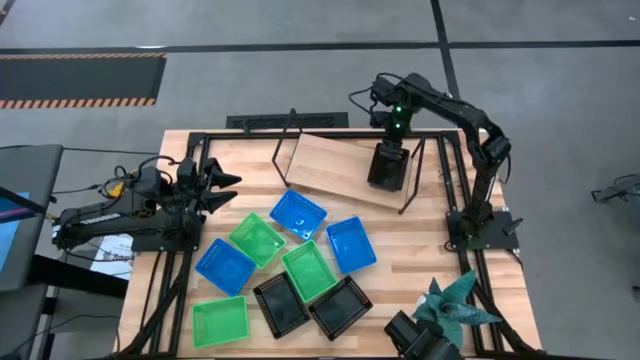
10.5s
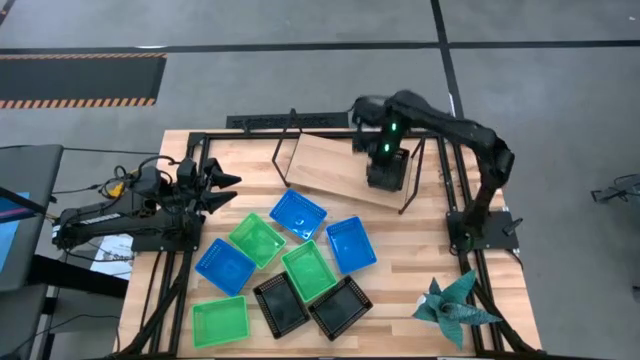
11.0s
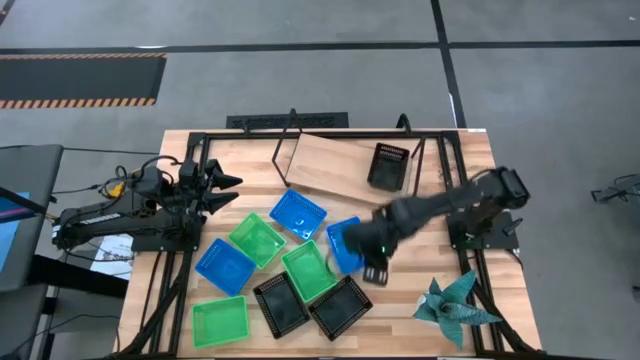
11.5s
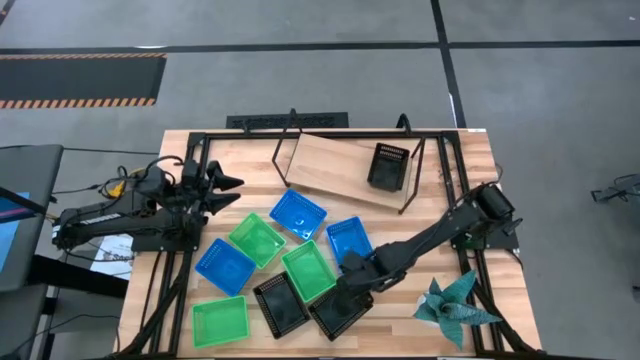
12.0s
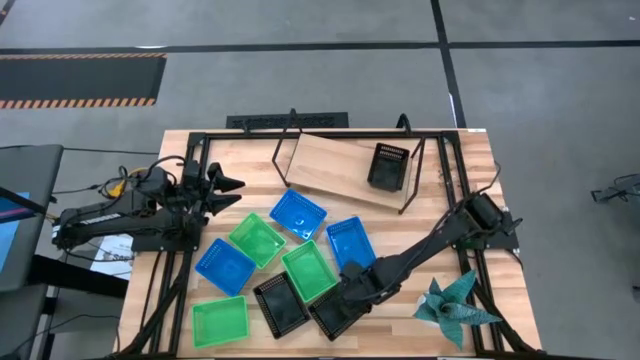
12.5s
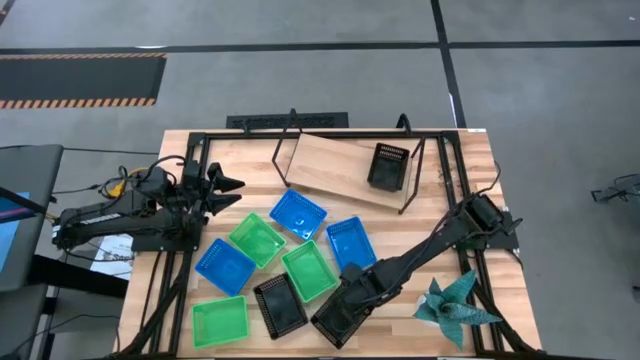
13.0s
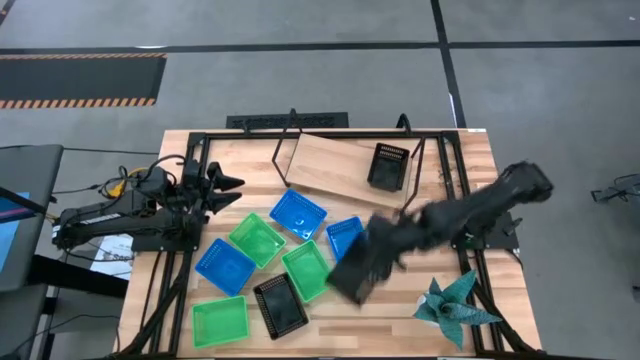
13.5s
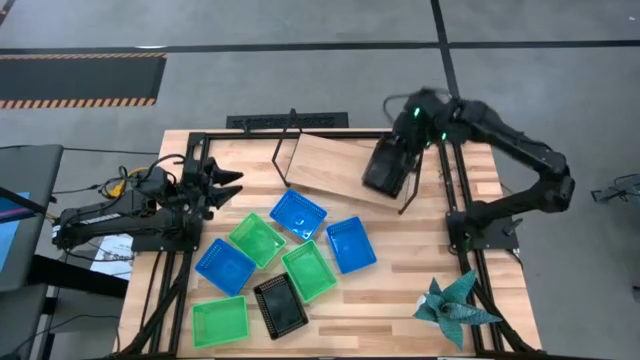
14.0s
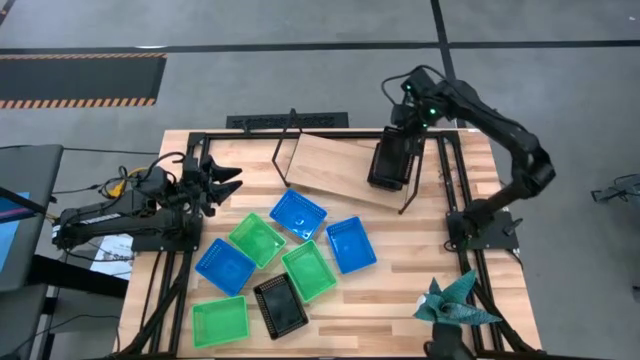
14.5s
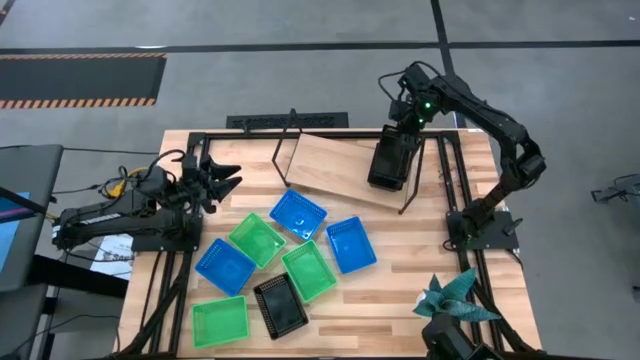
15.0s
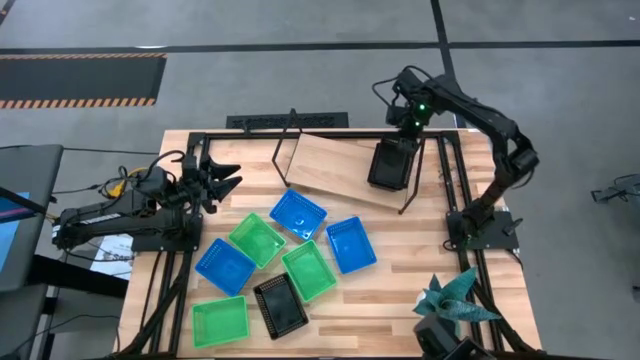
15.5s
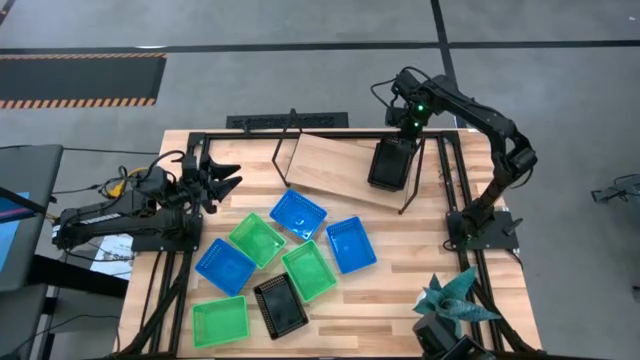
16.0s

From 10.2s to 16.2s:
Task: Stack baskets on shelf by color
Stack the right black bin on top of the black bin on the shelf

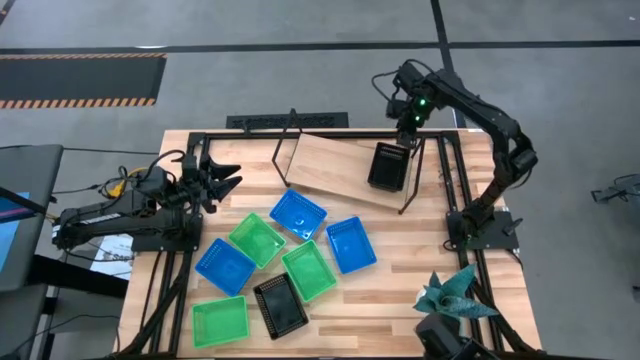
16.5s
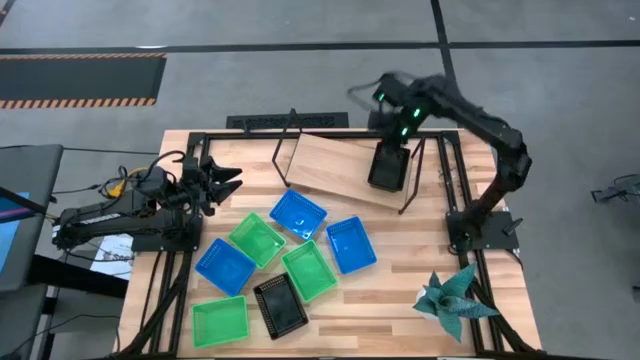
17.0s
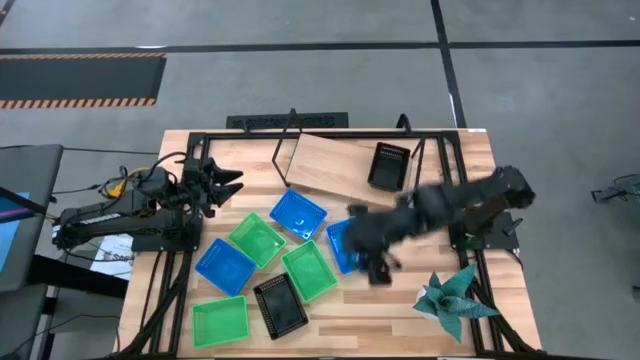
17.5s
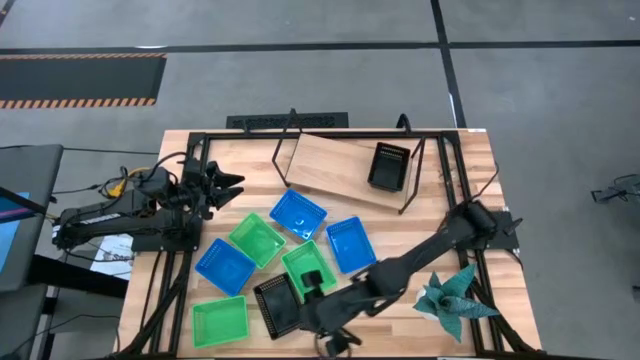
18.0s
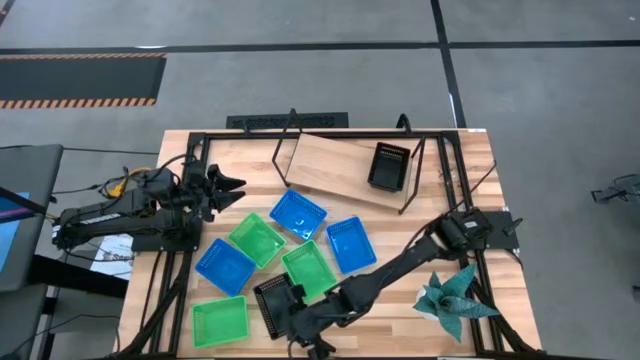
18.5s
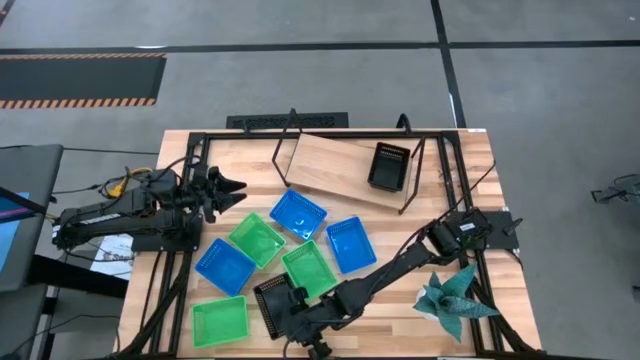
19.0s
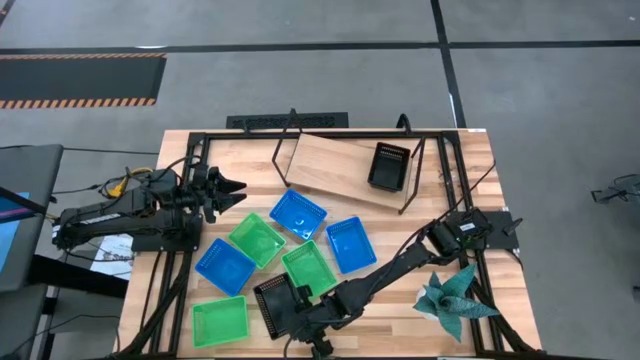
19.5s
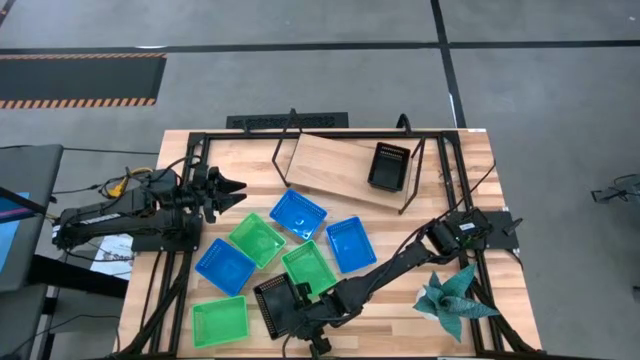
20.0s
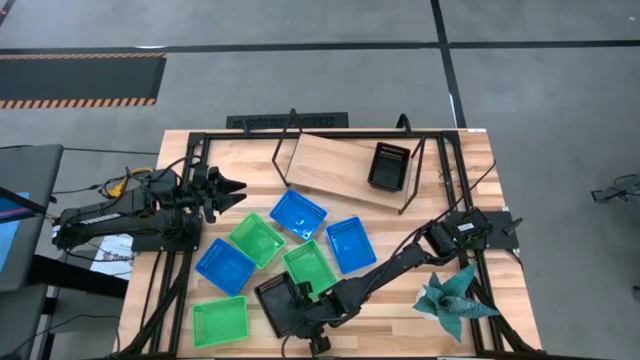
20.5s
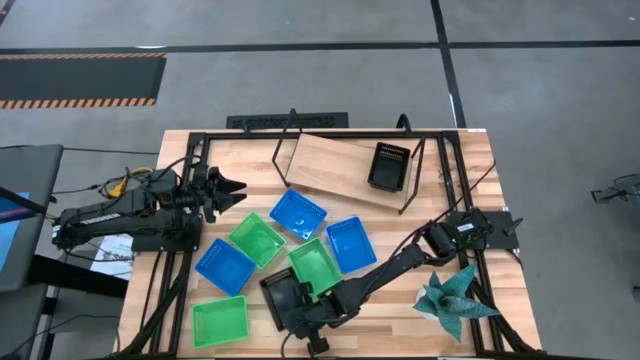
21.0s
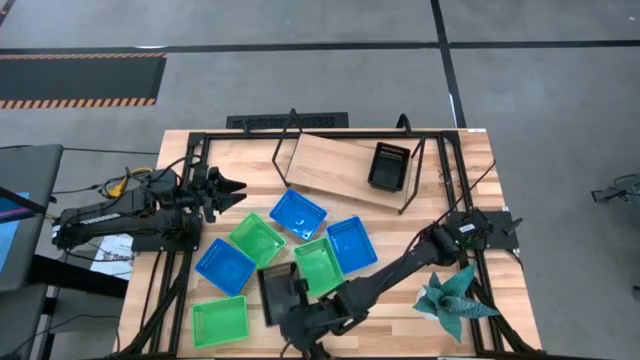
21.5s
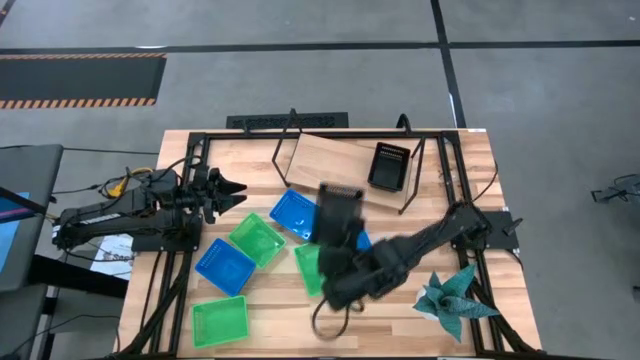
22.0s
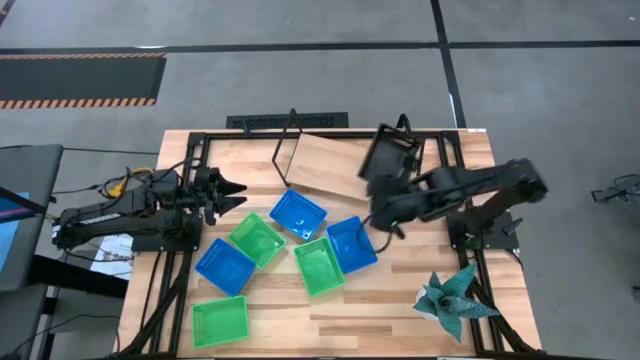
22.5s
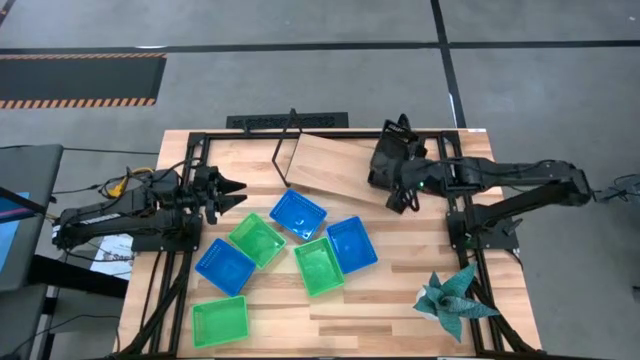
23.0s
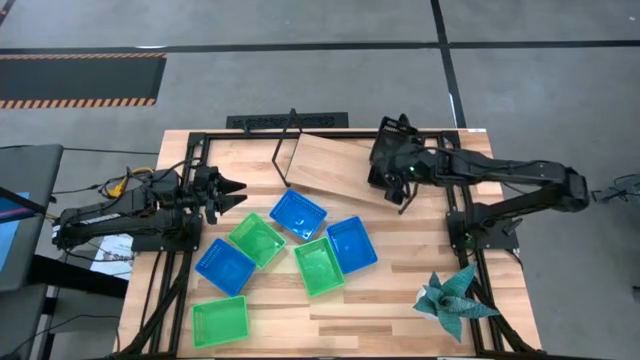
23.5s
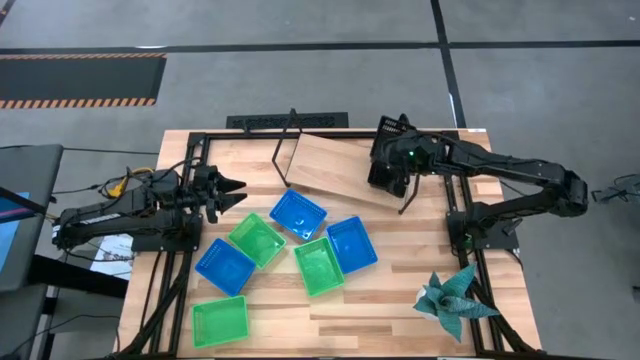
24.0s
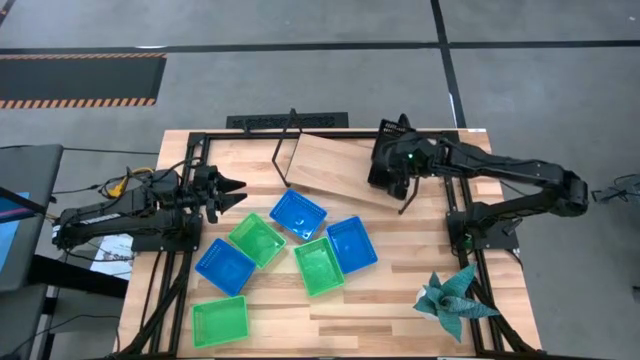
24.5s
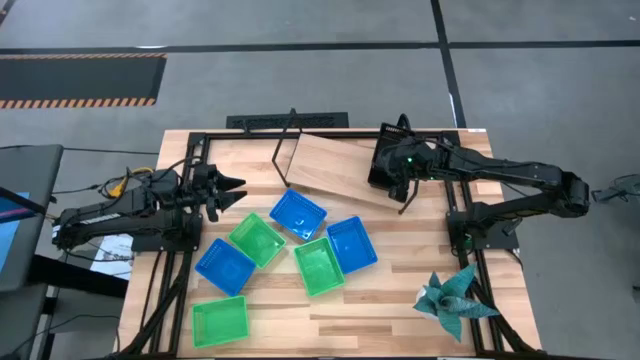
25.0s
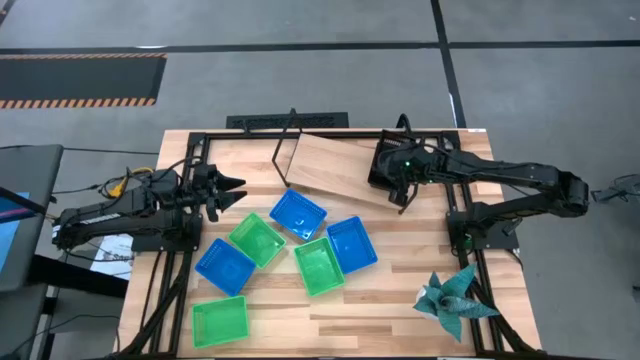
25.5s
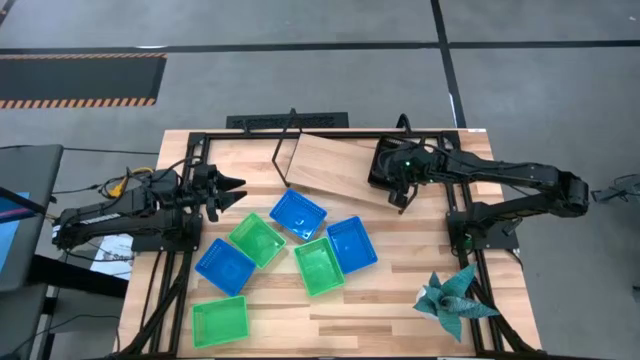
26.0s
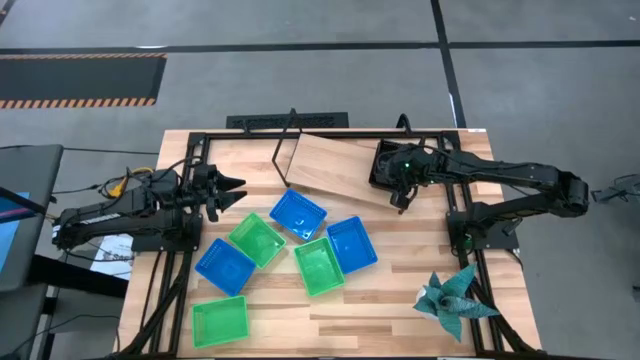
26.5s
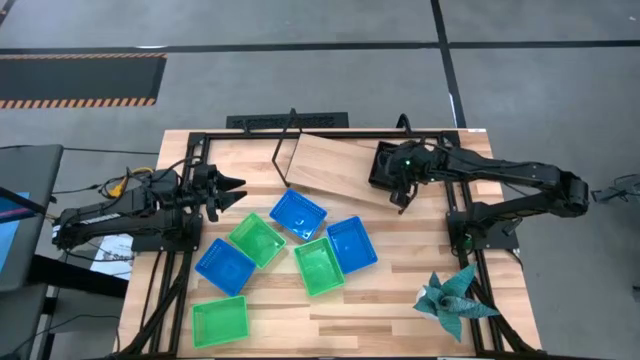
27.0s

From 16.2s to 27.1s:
Stack the black bin on top of the black bin on the shelf

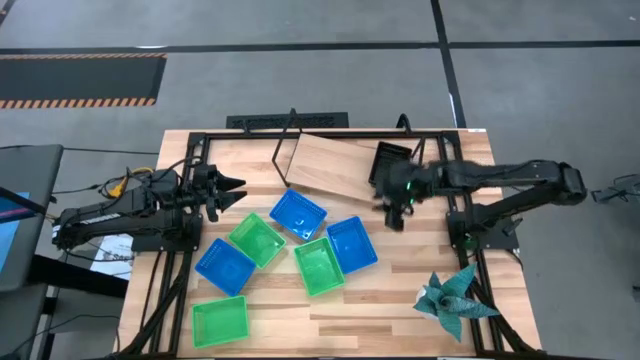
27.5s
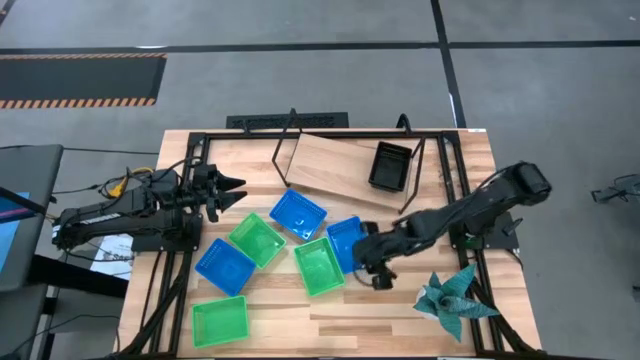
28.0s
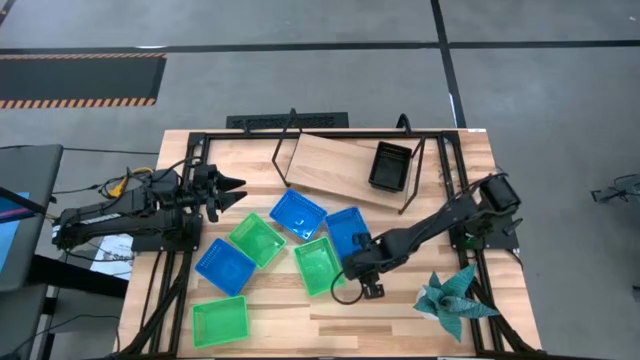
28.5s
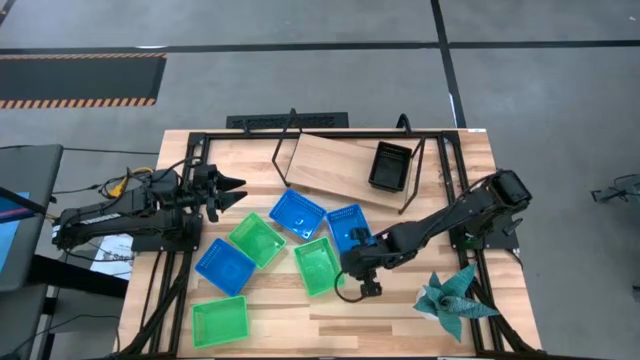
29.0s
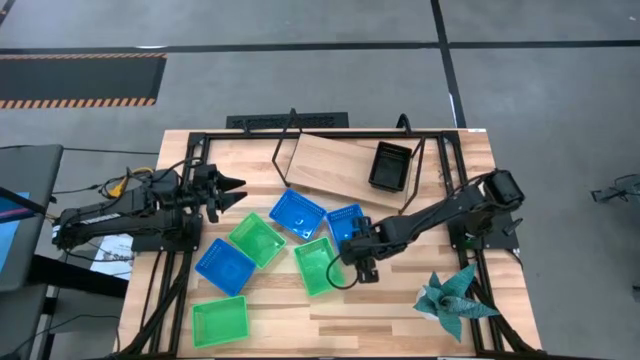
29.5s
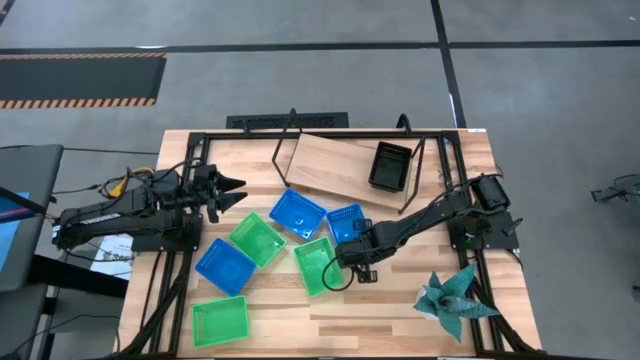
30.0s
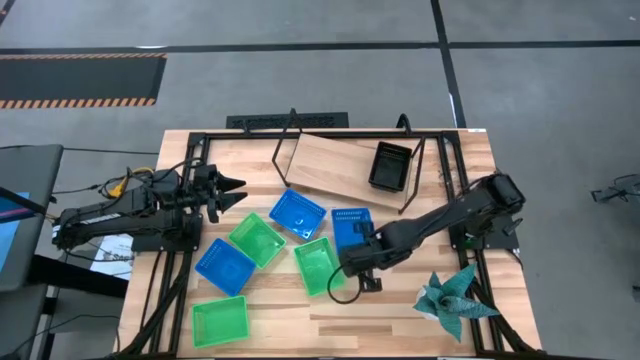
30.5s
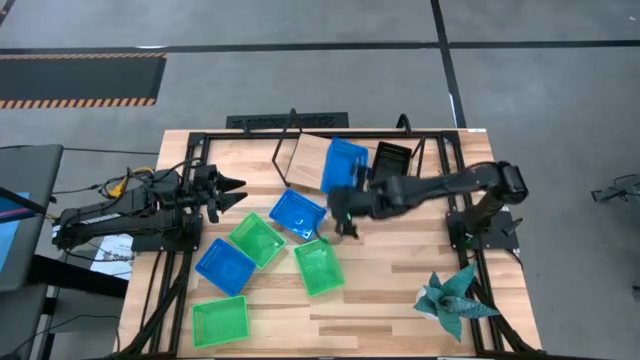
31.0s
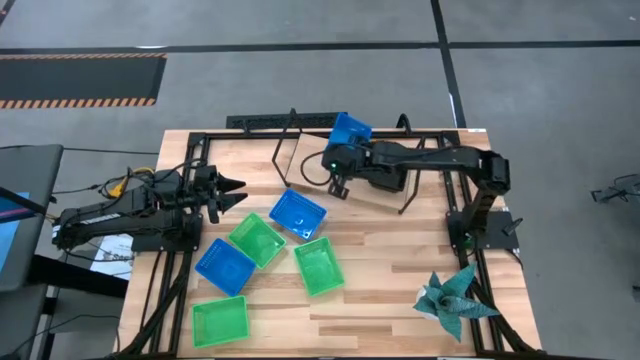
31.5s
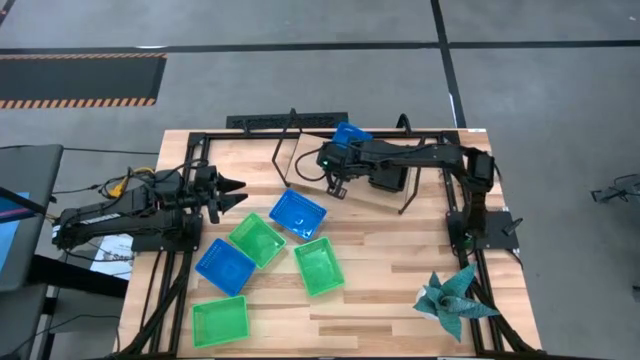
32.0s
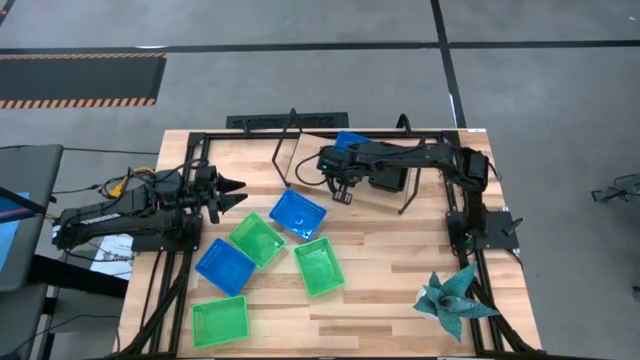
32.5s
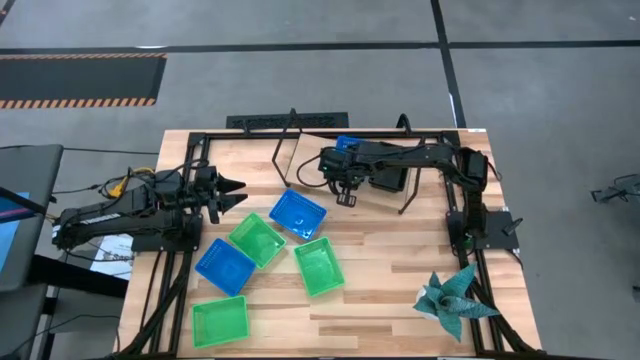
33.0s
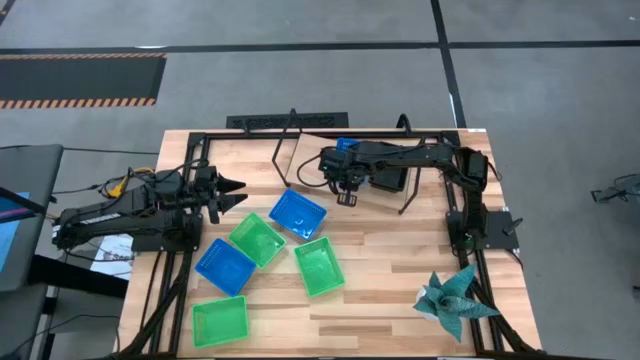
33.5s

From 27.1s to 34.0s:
Put the bottom right blue bin on the shelf
